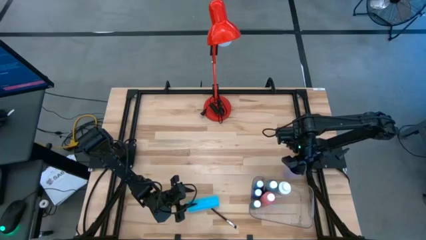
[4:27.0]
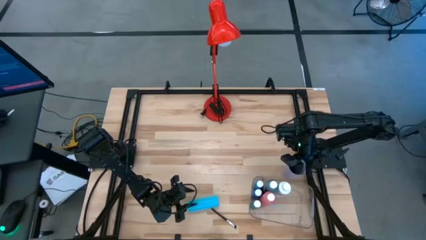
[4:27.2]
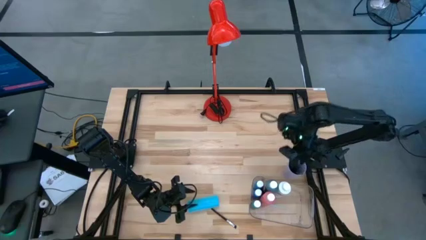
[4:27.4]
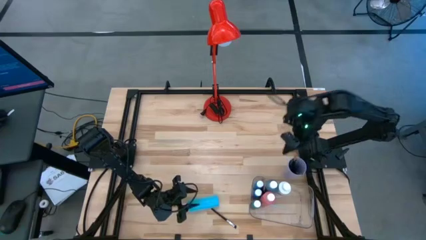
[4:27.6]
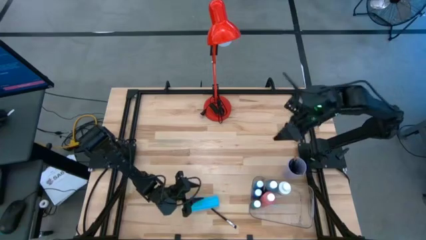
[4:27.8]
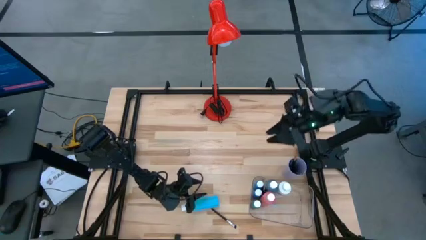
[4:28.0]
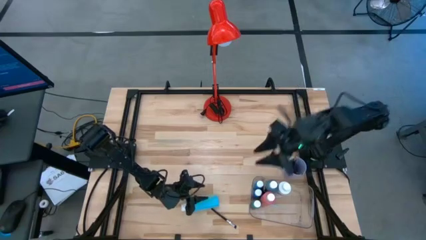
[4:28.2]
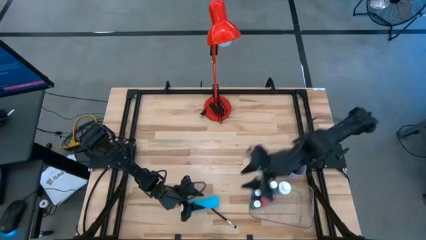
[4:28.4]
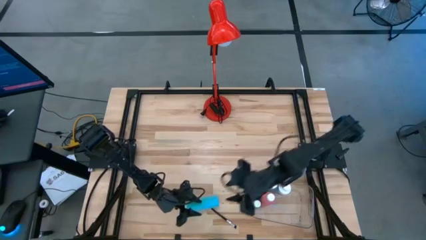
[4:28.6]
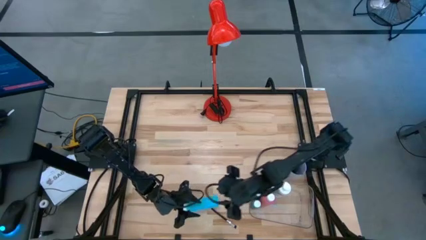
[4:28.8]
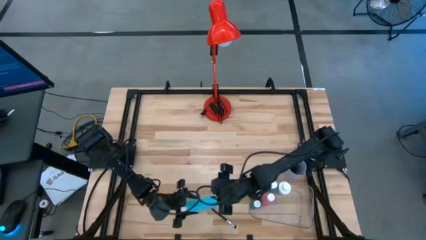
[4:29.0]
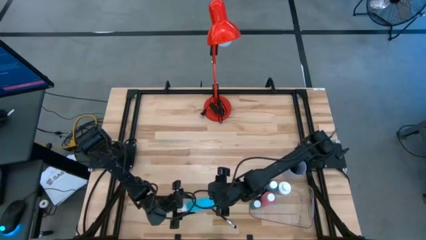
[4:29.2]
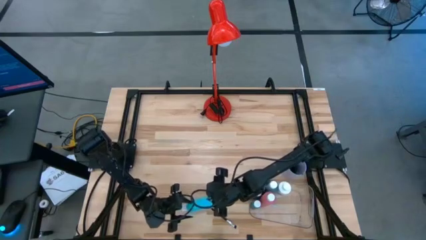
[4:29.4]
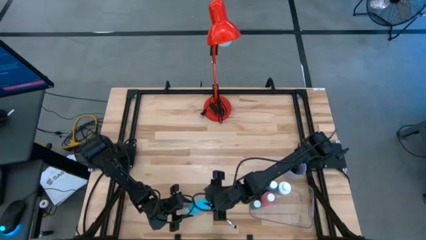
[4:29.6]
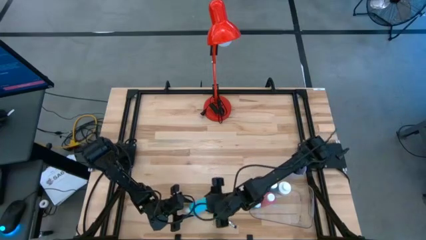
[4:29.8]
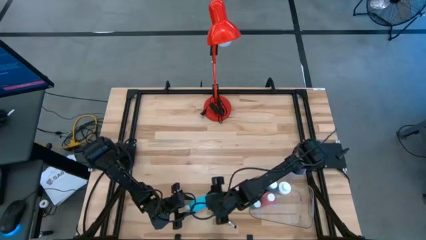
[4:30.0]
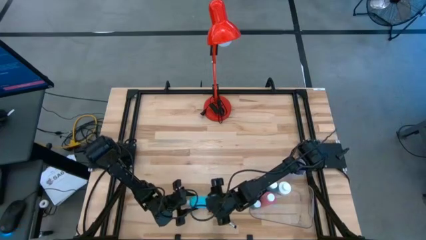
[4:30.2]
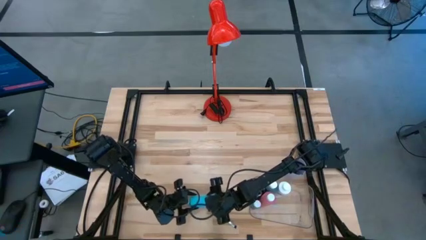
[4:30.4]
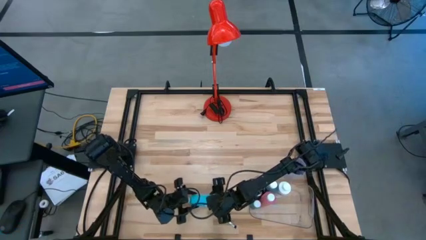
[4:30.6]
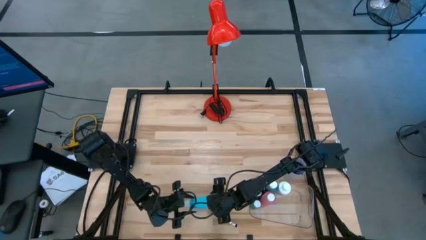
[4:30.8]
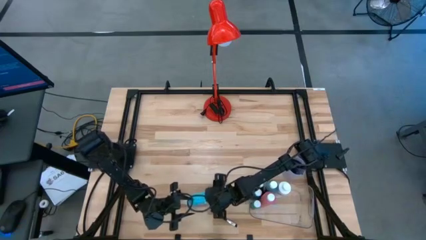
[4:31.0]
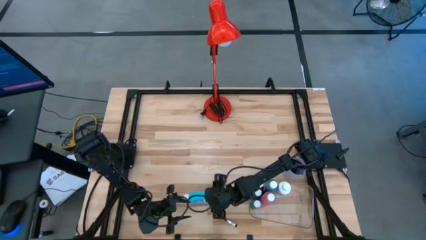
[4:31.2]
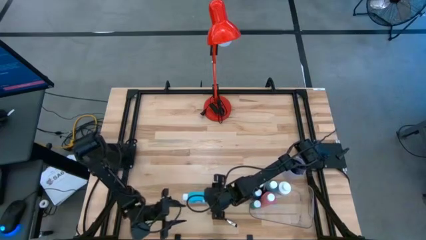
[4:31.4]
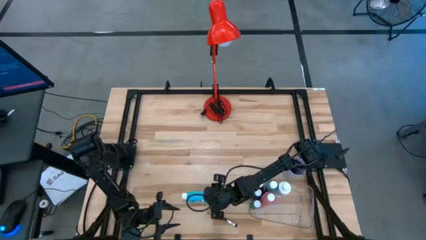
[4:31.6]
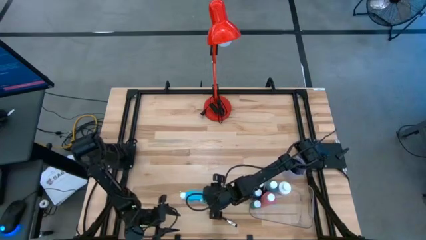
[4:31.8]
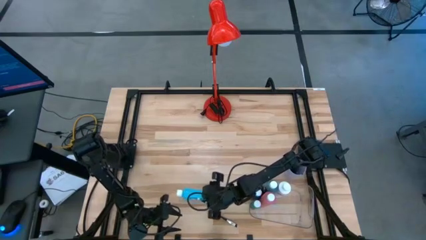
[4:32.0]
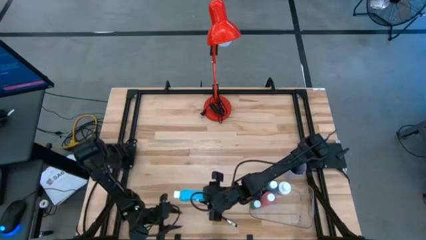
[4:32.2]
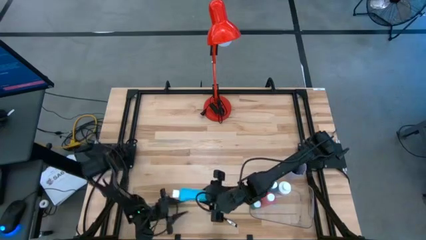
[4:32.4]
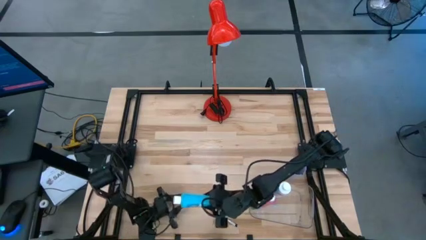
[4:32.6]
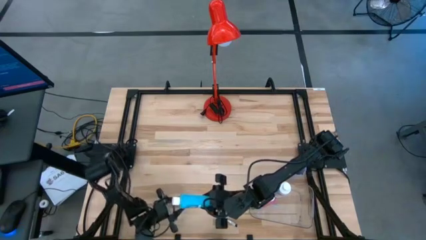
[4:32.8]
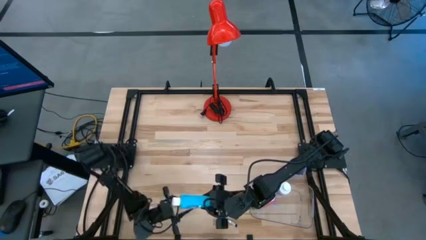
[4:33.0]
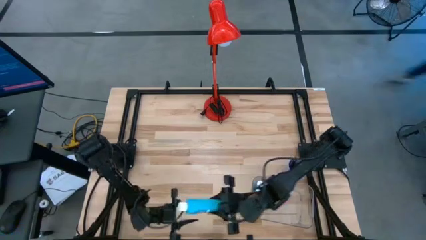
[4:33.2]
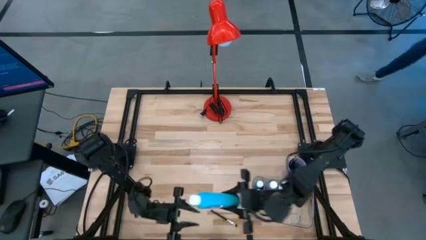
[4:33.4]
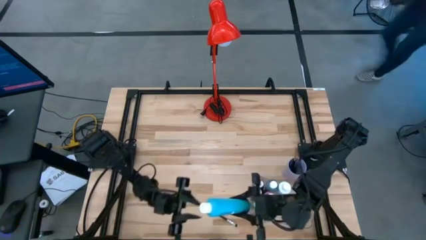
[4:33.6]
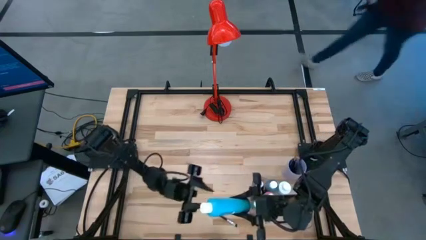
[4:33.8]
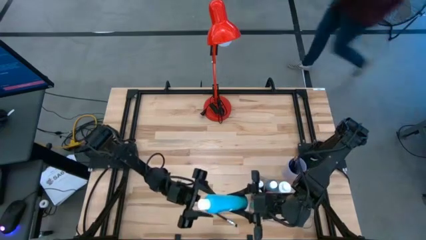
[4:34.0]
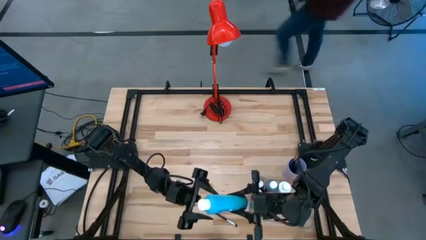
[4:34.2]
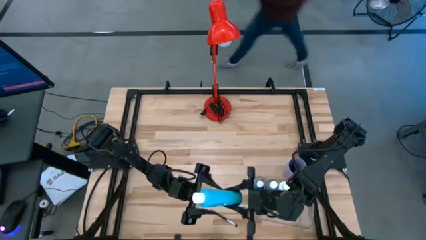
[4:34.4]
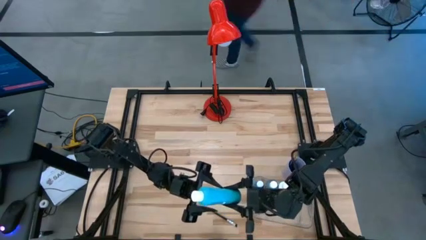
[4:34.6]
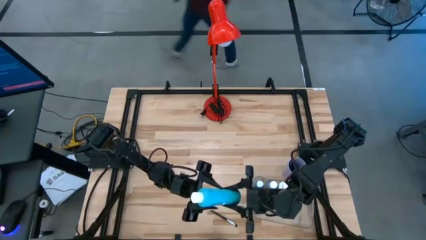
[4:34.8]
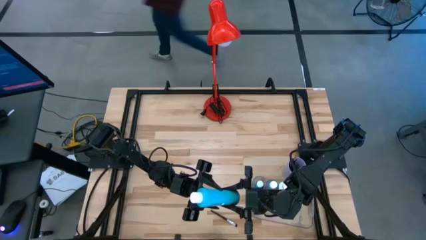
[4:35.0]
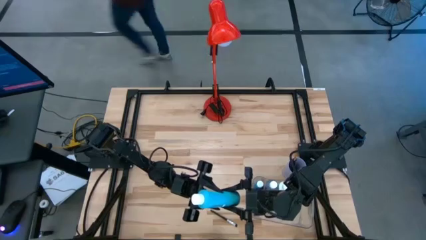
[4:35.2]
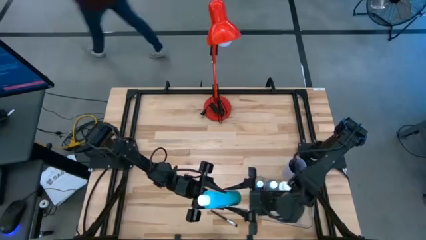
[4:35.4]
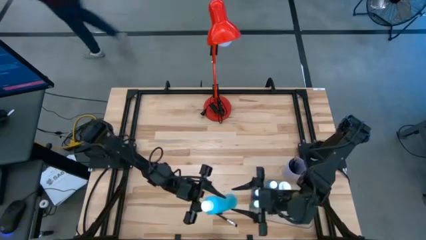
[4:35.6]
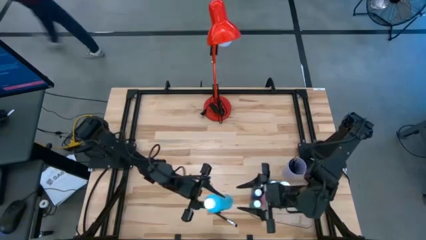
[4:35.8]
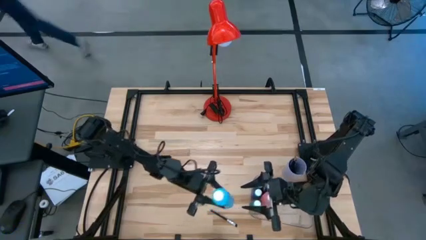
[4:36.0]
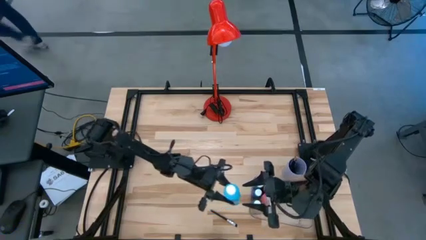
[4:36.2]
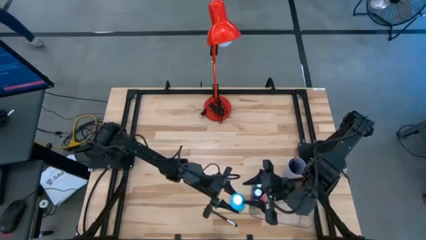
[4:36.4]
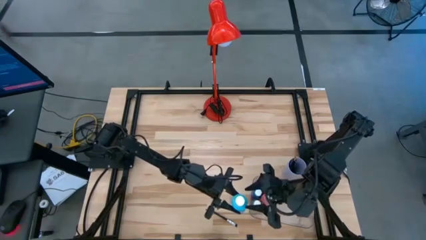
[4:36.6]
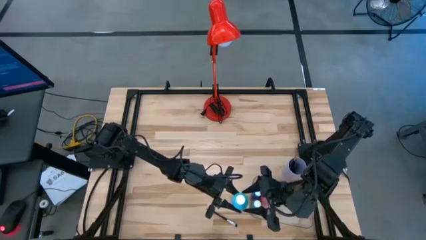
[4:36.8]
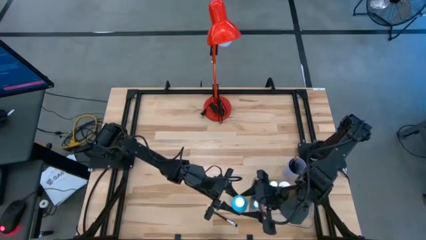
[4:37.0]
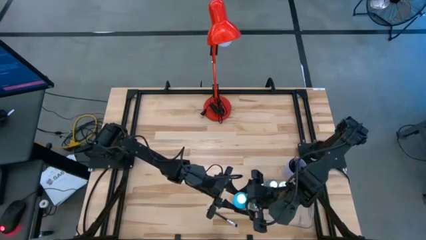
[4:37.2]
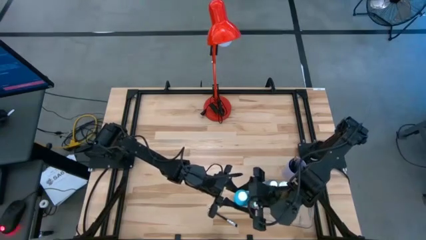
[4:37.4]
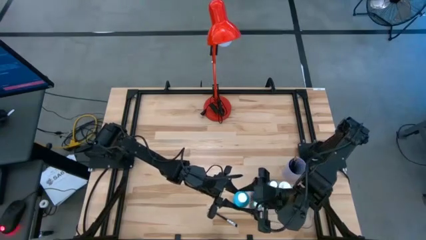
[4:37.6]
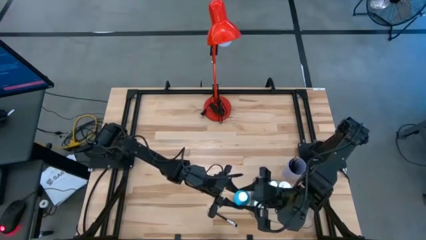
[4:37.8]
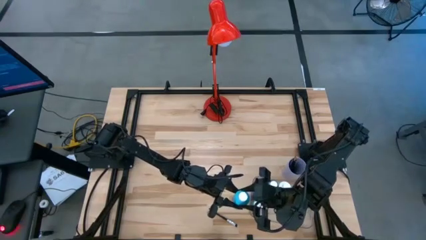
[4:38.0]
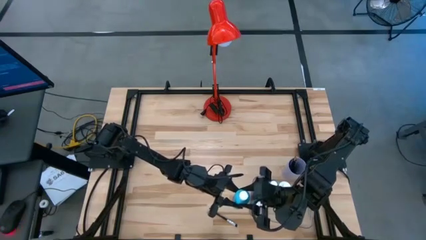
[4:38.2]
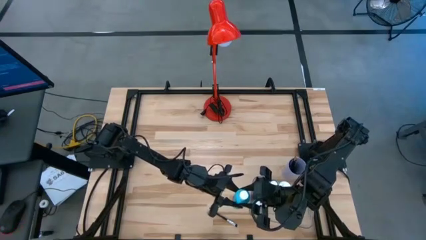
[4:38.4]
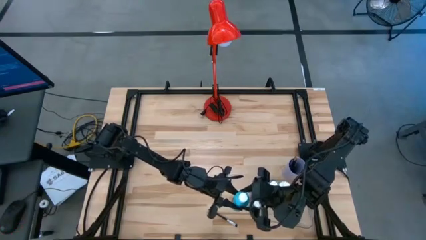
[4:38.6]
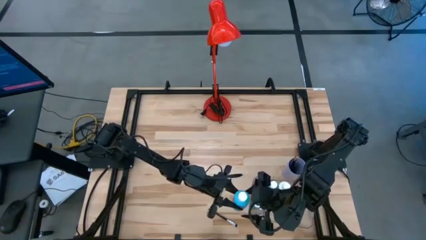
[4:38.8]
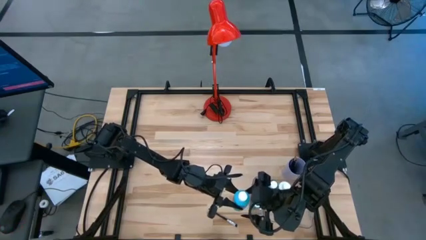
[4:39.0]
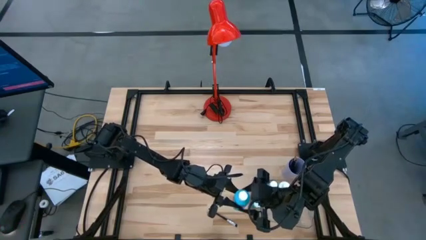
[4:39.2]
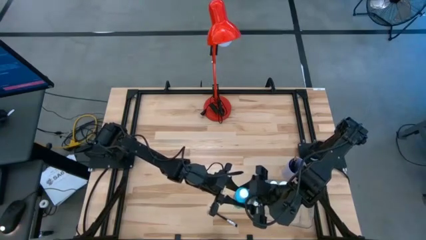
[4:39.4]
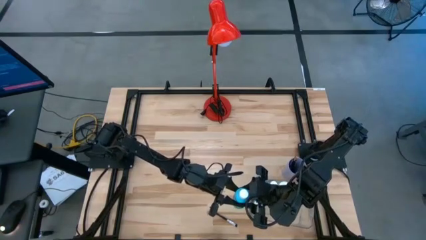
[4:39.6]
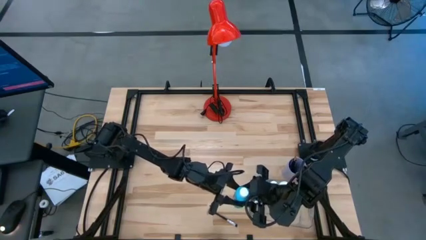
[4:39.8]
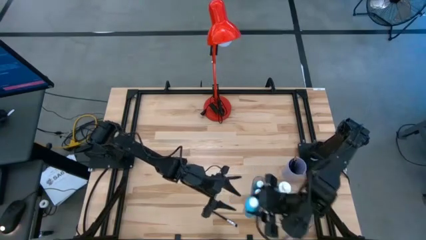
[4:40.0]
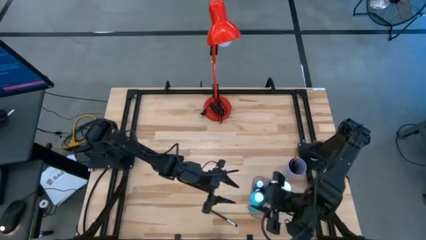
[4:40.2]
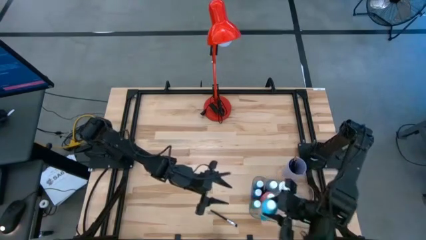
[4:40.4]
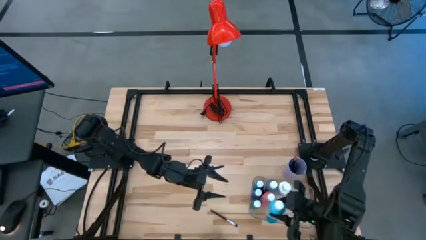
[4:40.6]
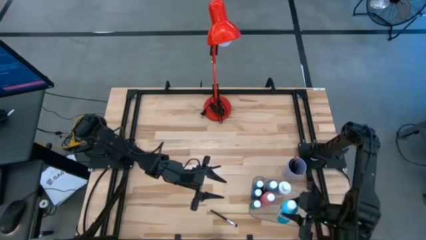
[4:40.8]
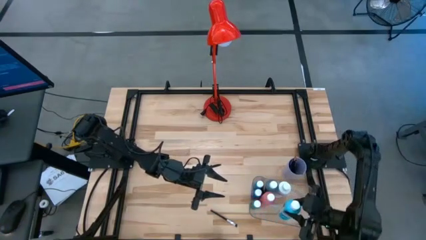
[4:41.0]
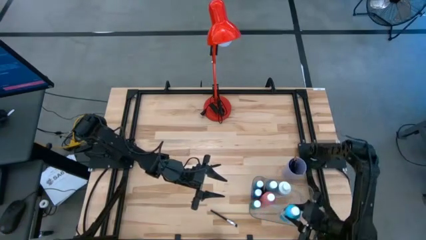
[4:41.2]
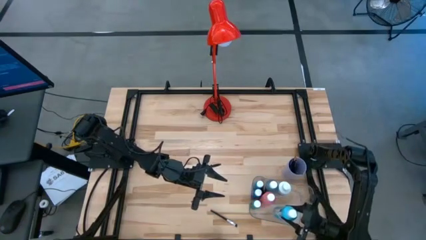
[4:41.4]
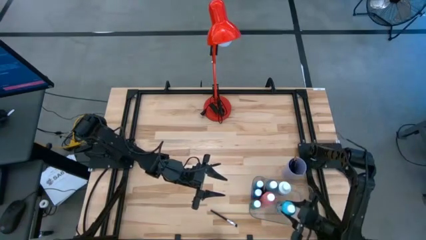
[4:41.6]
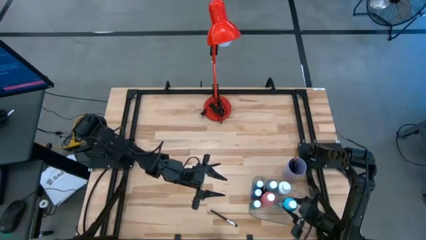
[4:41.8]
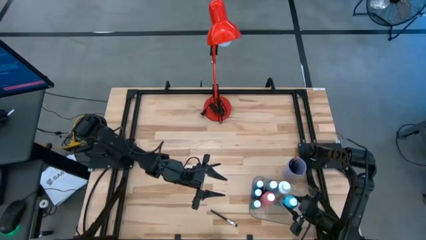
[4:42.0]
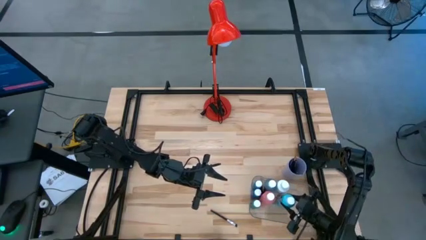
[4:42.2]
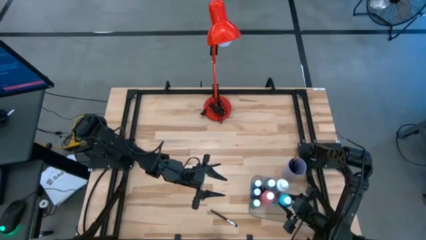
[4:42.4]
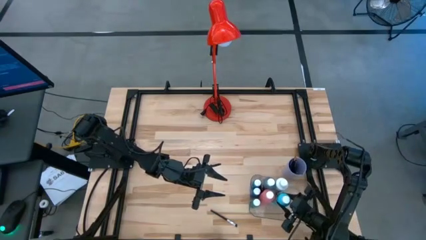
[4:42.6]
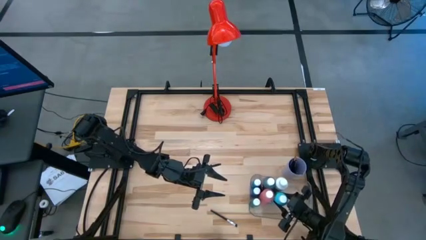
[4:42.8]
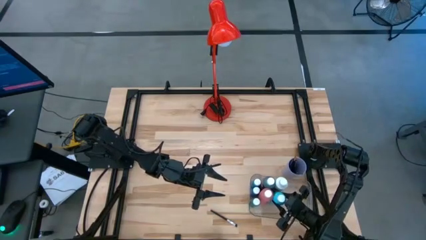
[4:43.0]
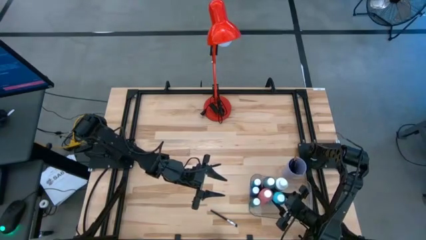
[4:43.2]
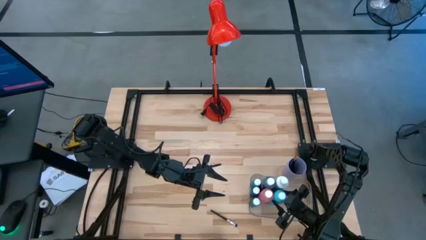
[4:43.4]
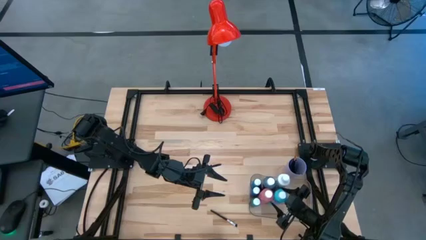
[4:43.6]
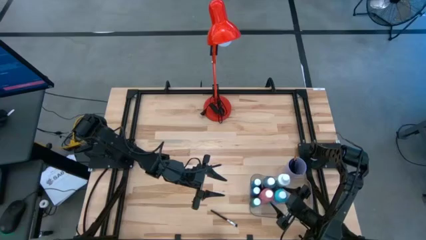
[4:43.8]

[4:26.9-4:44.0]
Task: Pick & Place Paint Supplies
Put the light blue paint bottle into the transparent bin
